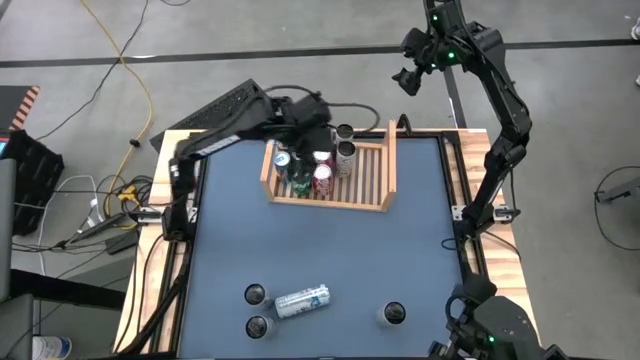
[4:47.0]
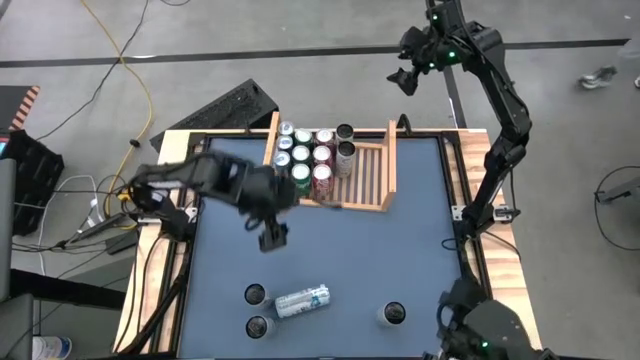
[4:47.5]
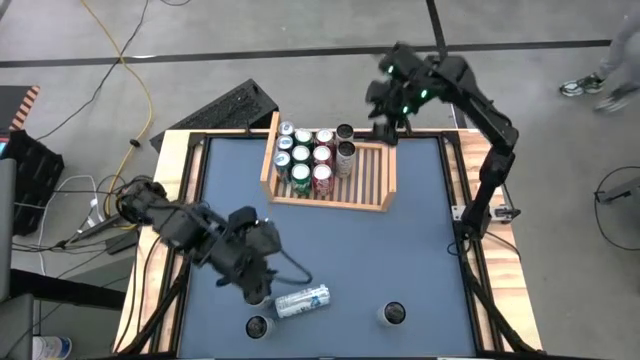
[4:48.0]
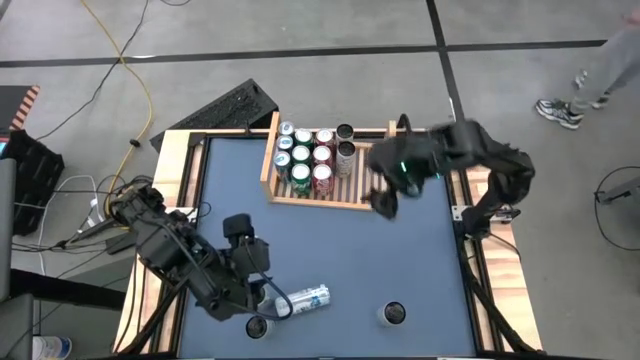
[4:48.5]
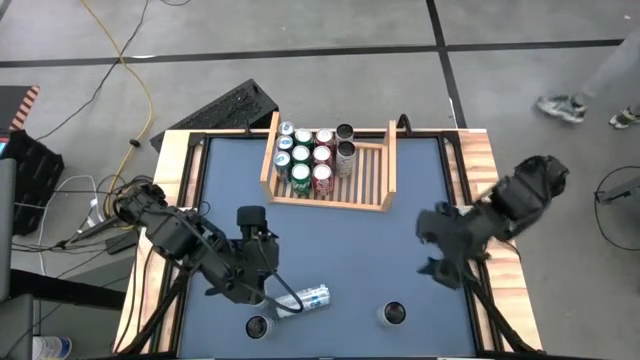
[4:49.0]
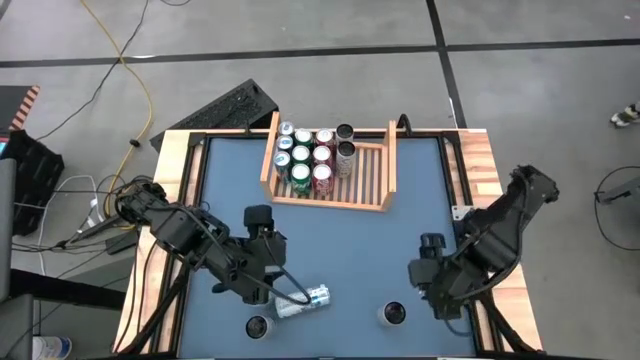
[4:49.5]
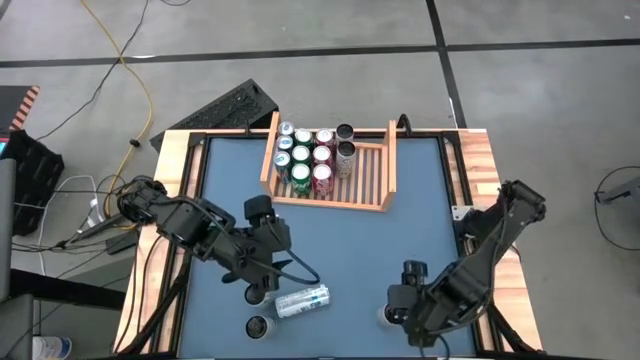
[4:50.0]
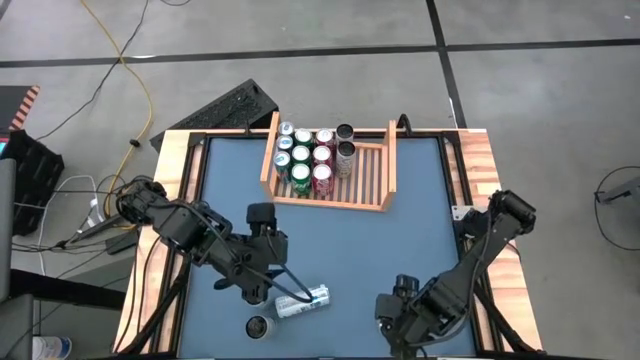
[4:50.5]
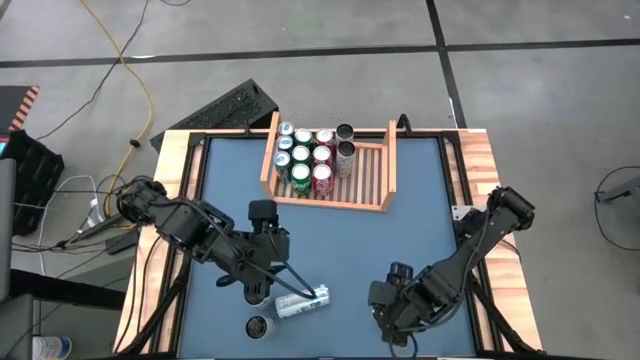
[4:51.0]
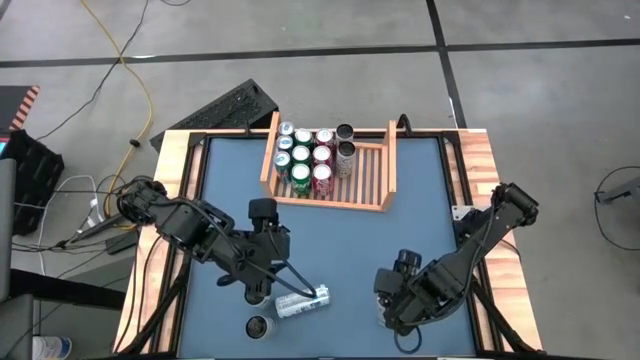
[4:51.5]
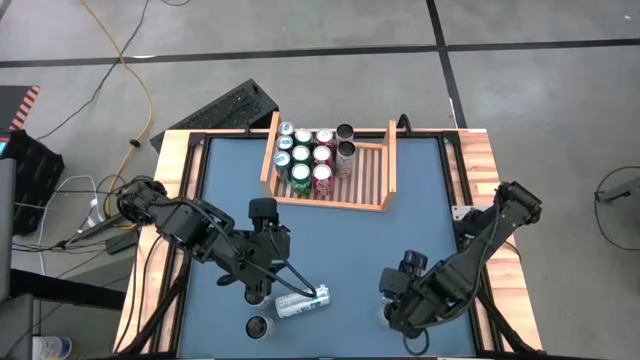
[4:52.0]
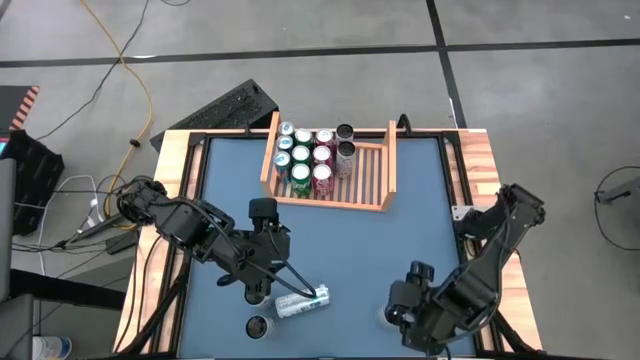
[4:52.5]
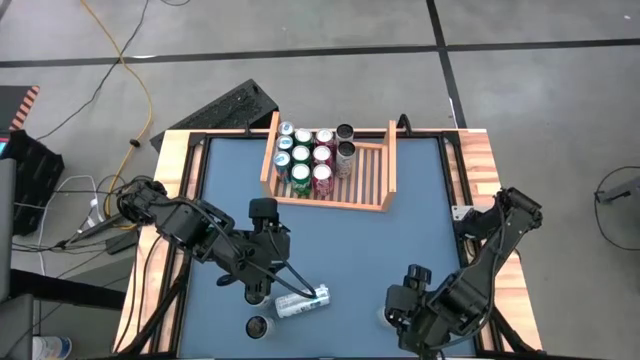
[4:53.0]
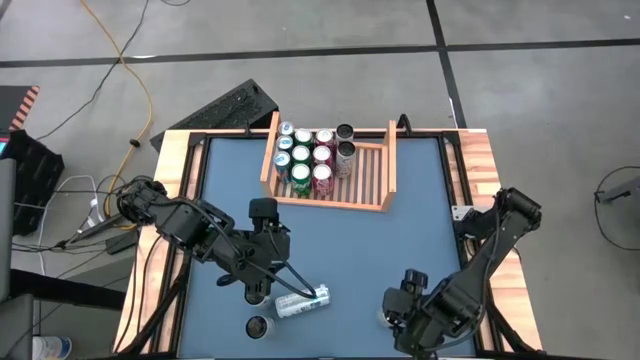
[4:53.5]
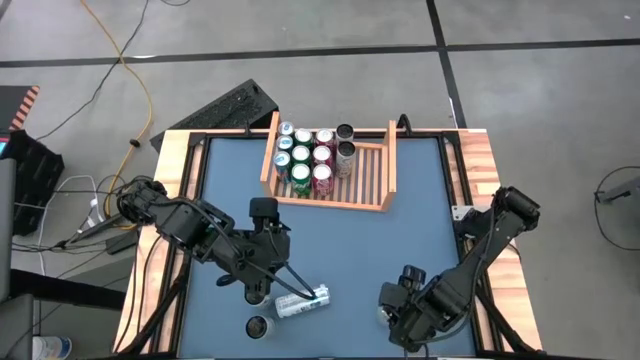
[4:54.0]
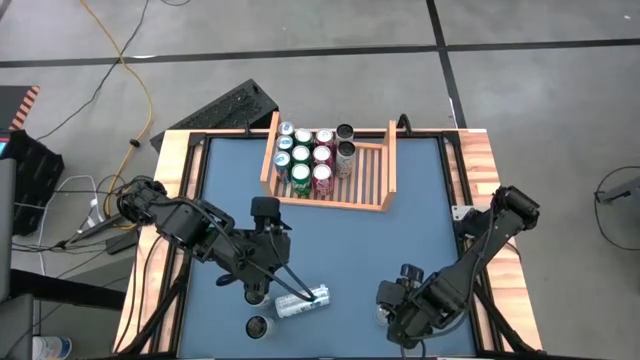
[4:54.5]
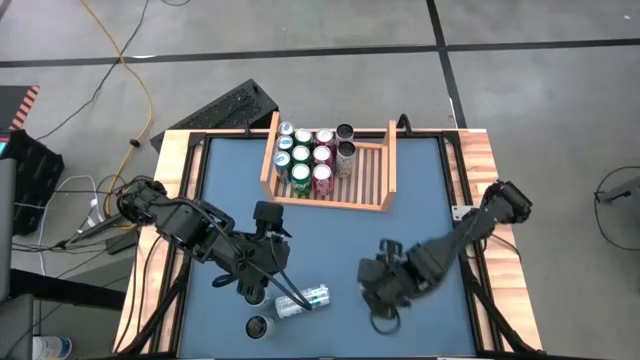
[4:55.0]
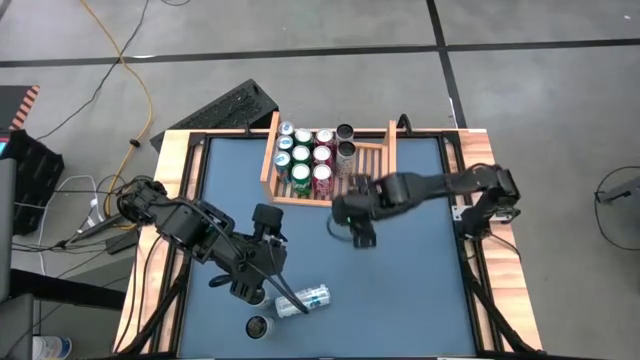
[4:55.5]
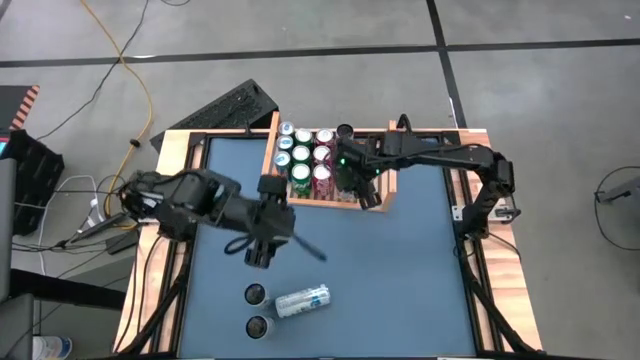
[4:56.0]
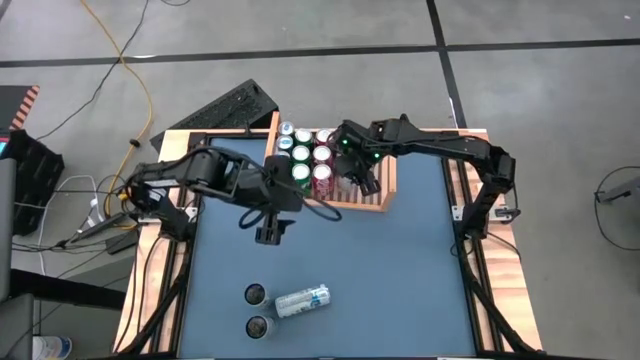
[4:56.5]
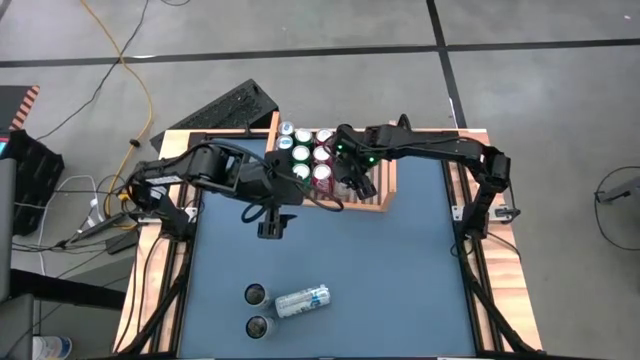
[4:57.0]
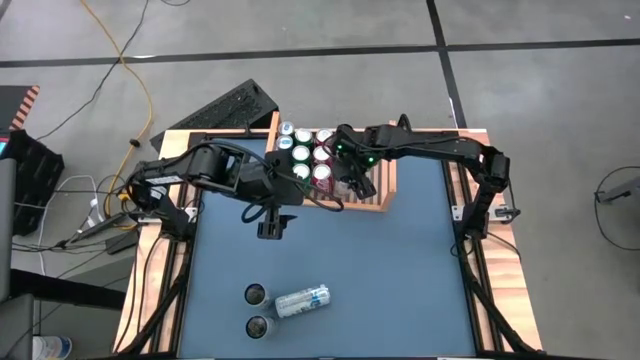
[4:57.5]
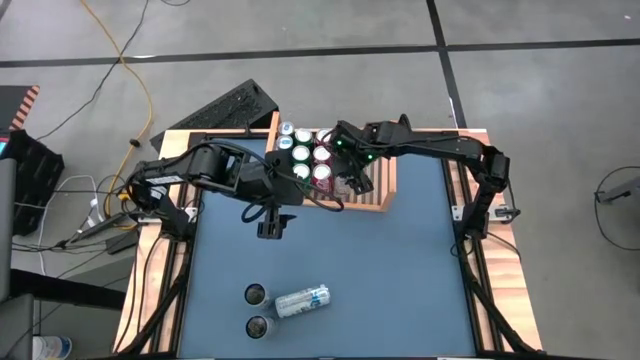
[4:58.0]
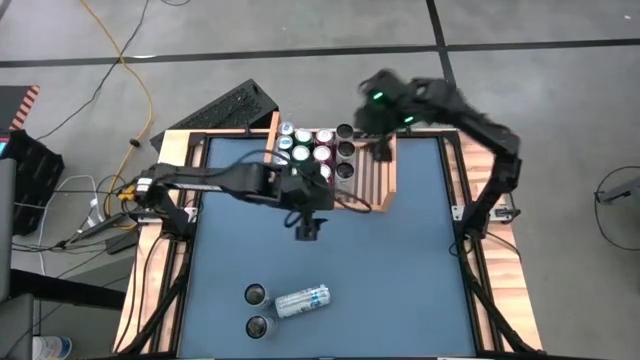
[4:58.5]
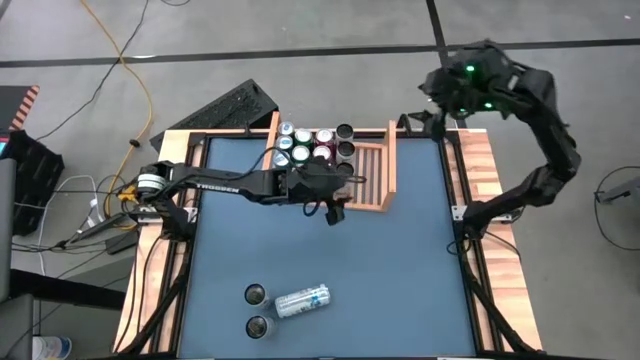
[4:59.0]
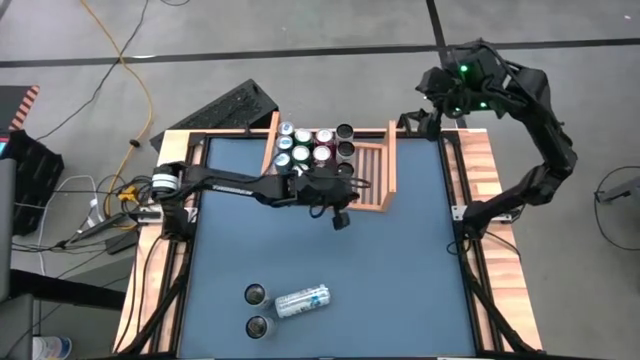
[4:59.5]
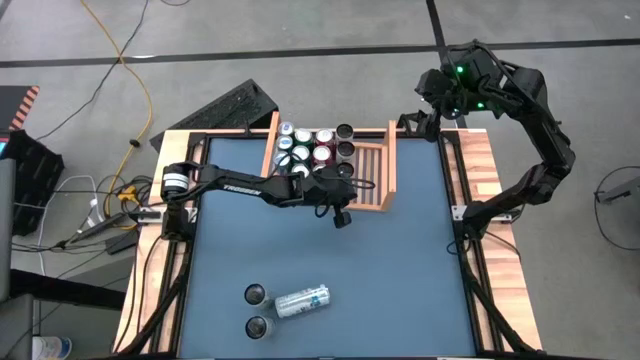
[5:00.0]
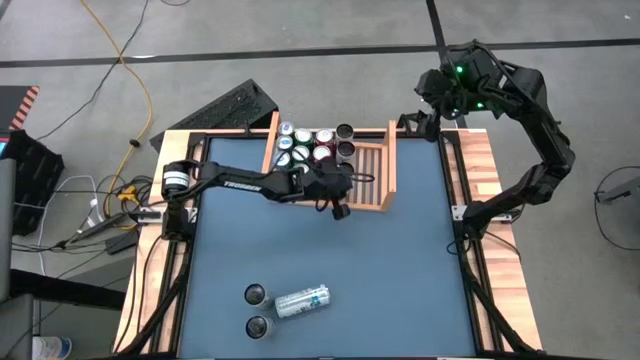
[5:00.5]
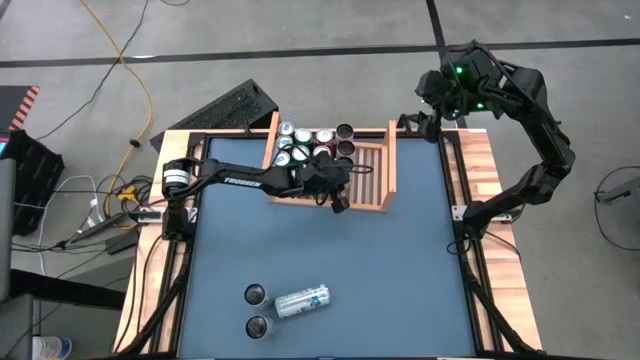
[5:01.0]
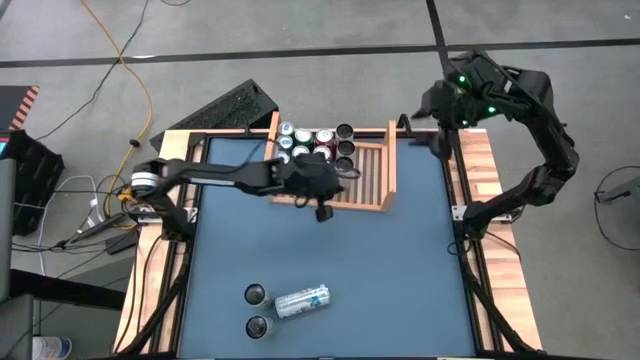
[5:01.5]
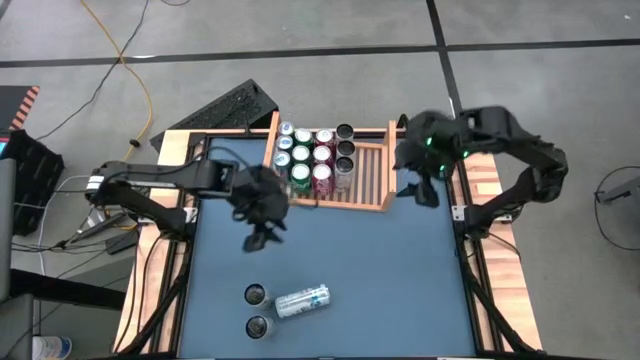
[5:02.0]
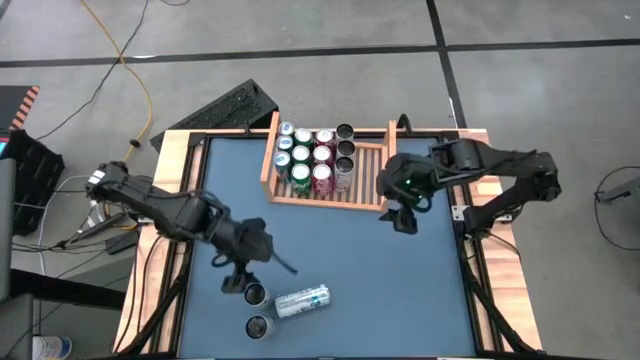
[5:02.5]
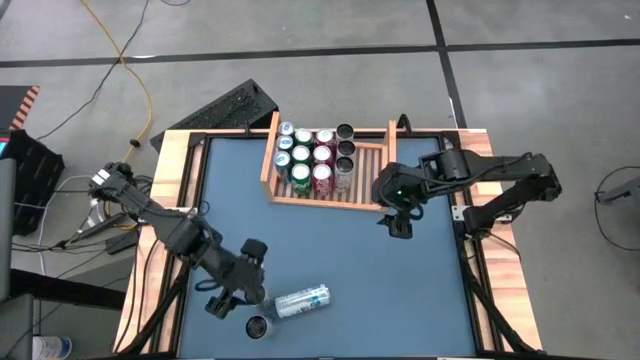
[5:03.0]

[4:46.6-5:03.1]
Task: Place canned beverage on shelf
Put the light yellow soda can on the shelf

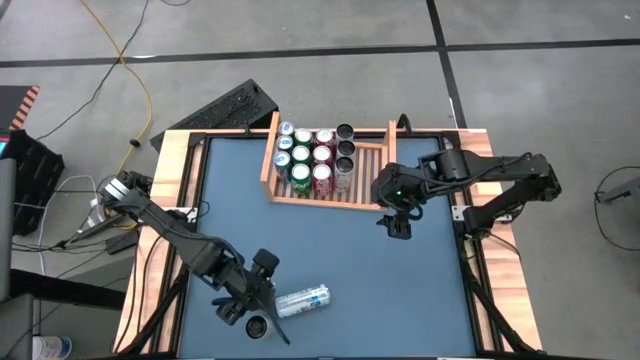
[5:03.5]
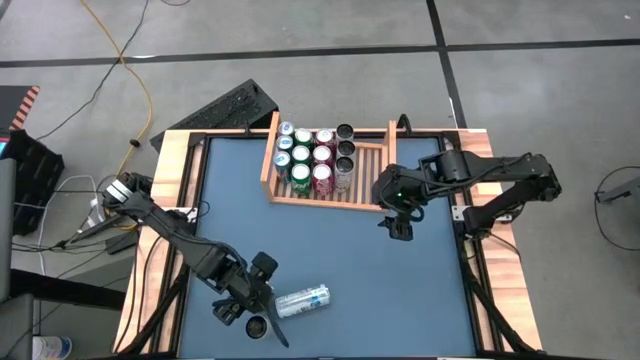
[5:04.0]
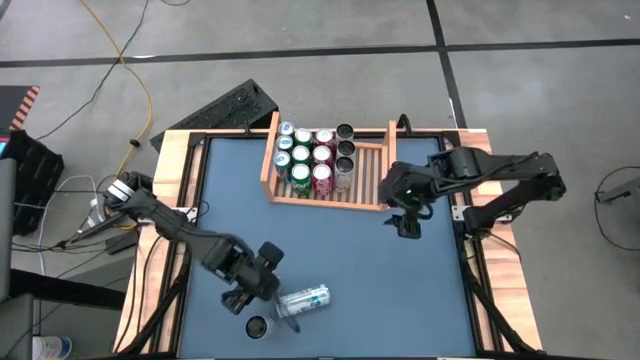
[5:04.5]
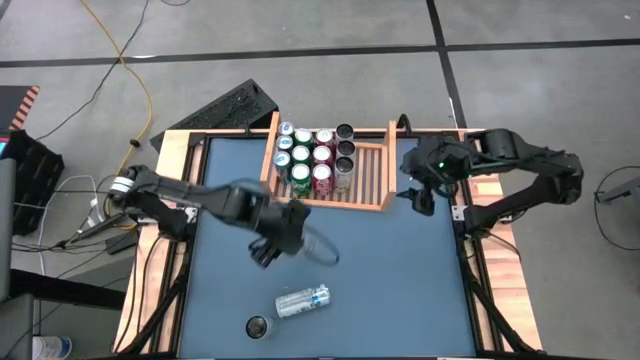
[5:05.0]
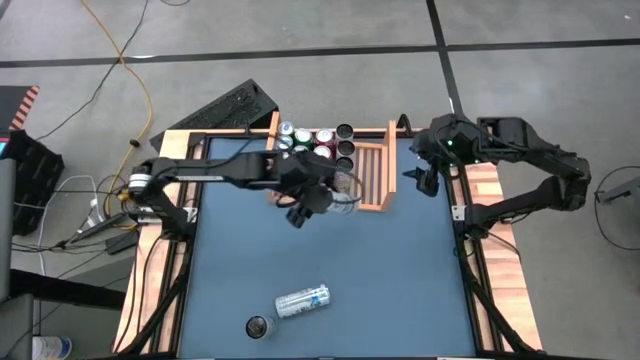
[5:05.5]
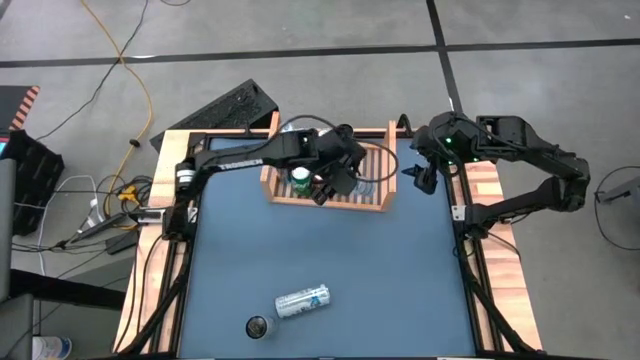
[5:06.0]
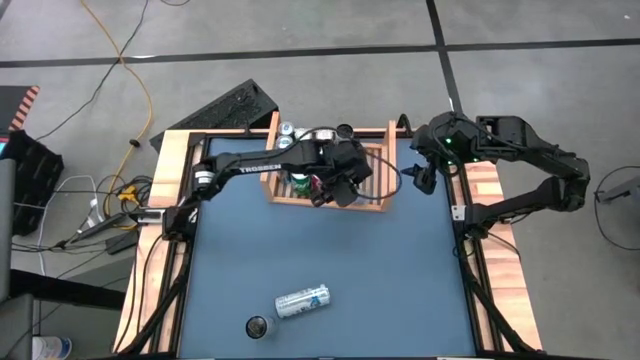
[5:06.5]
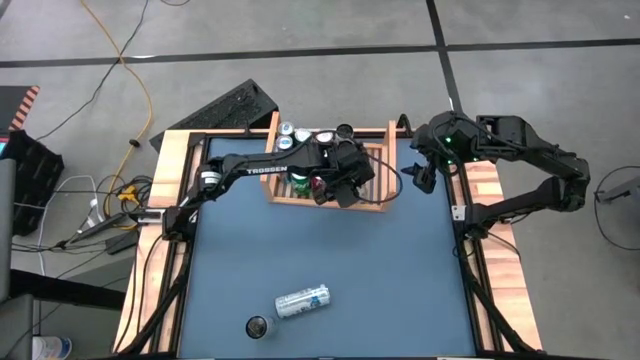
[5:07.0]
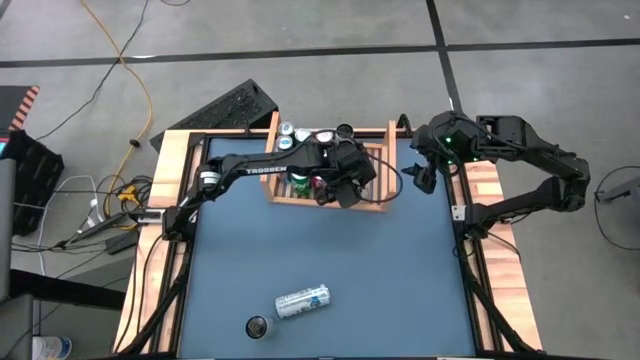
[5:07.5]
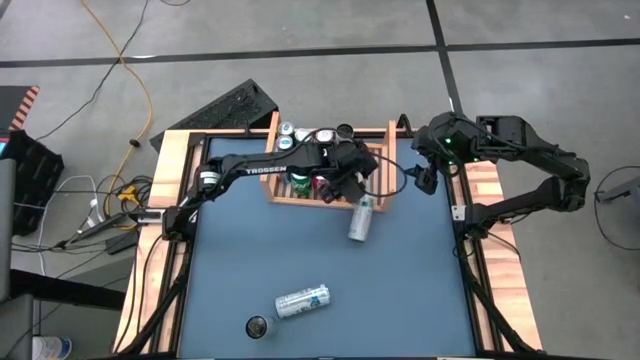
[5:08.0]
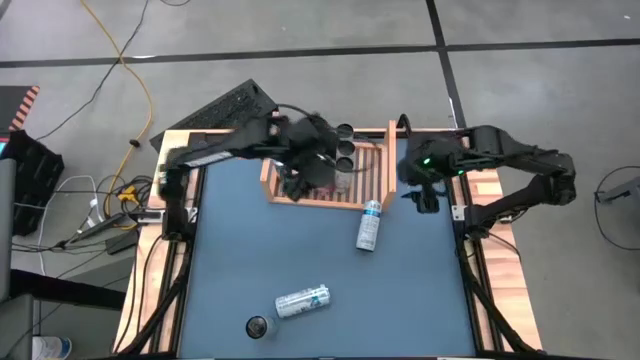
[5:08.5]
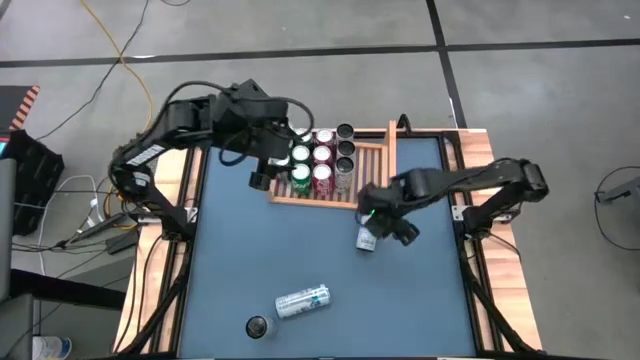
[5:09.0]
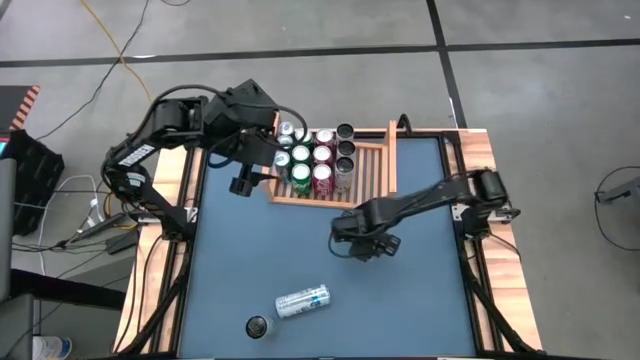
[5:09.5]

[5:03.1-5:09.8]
Put the light blue soda can on the shelf

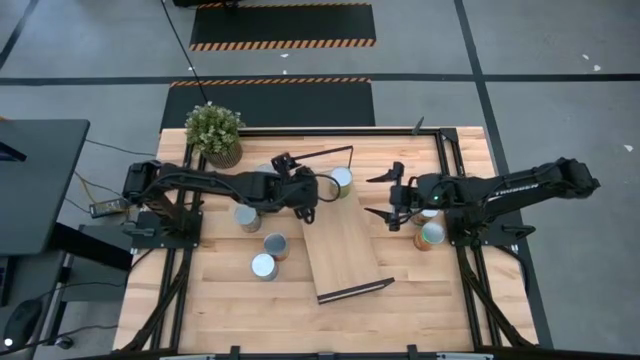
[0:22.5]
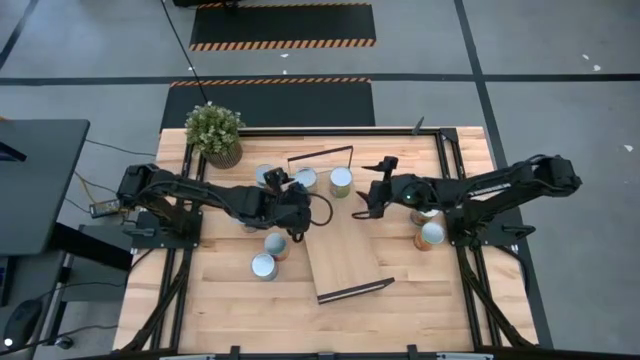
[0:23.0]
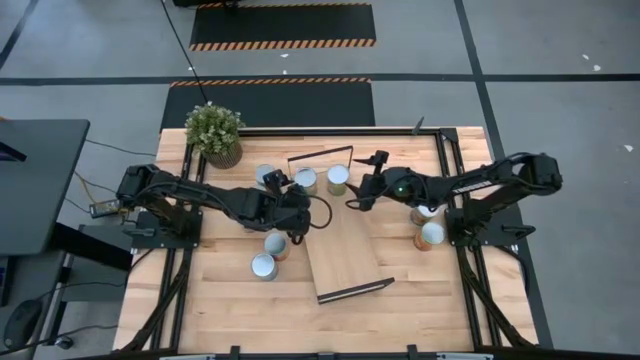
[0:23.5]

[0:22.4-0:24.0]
Task: Pick and place cans onto a shelf
Adjust the right canned oranges on the shelf
